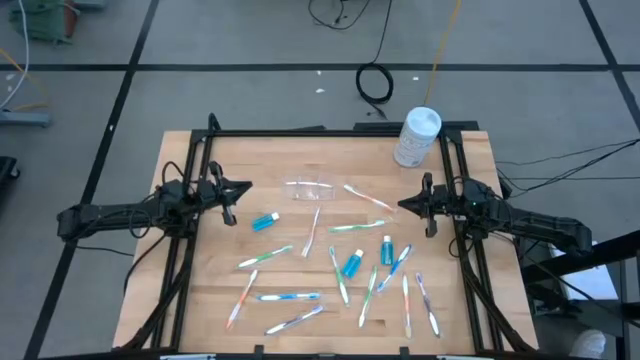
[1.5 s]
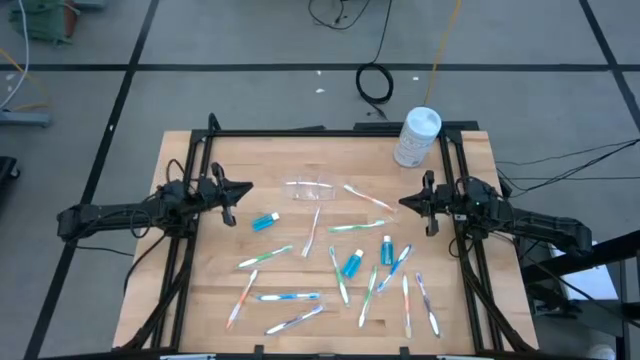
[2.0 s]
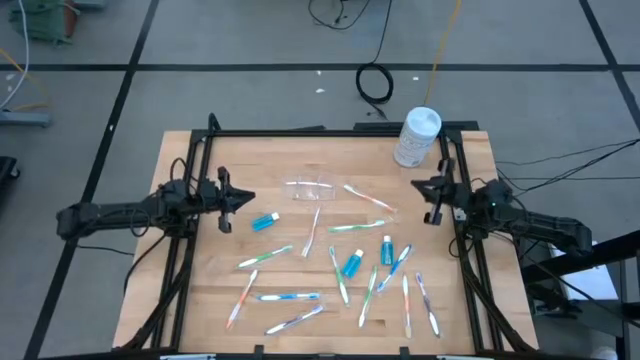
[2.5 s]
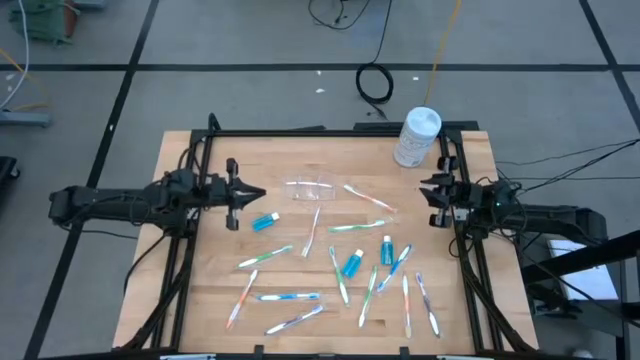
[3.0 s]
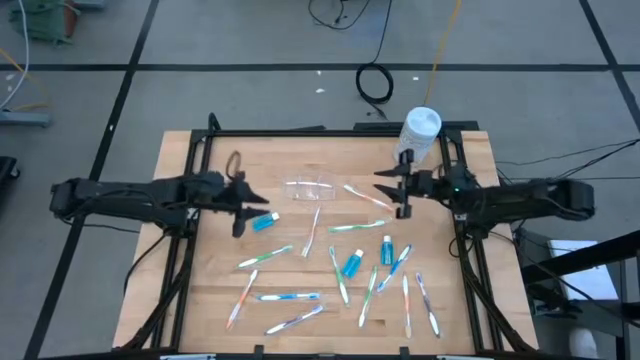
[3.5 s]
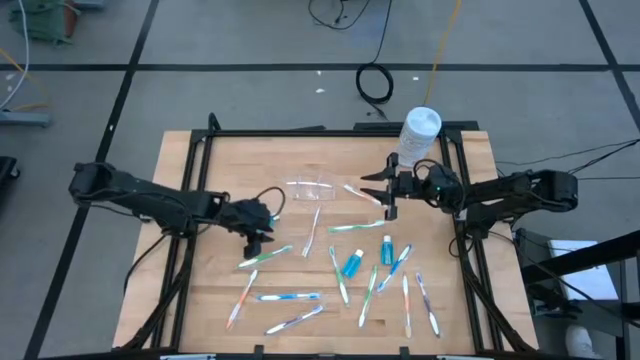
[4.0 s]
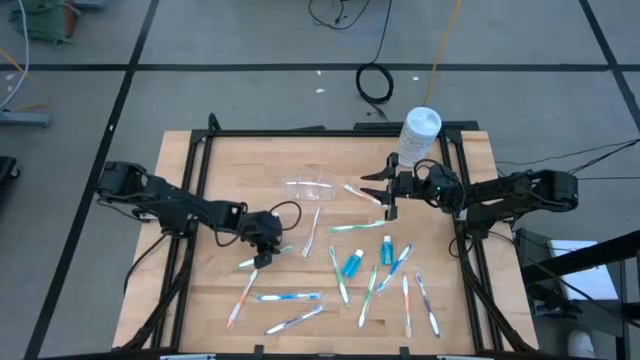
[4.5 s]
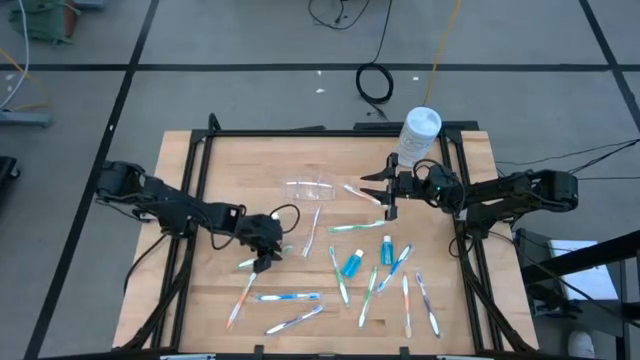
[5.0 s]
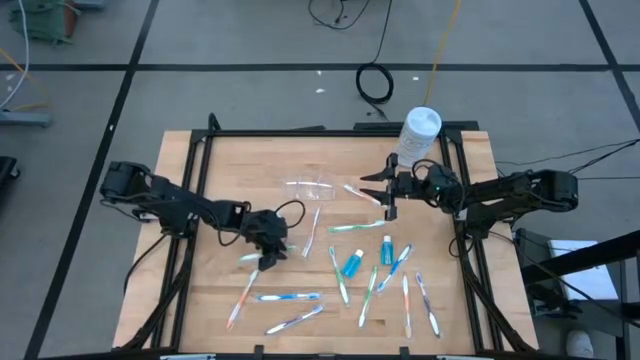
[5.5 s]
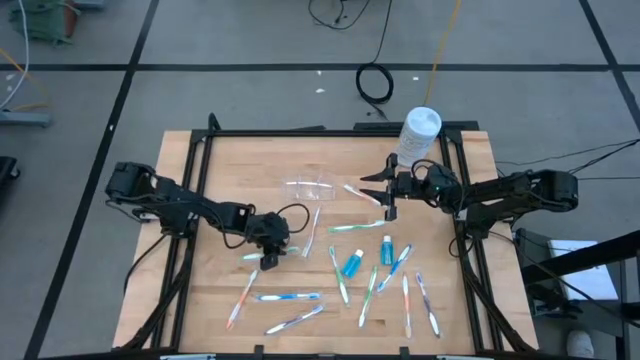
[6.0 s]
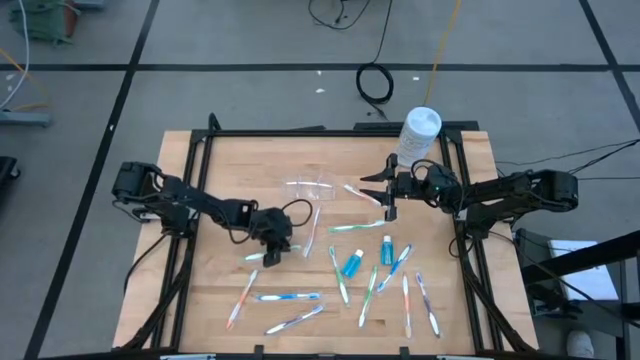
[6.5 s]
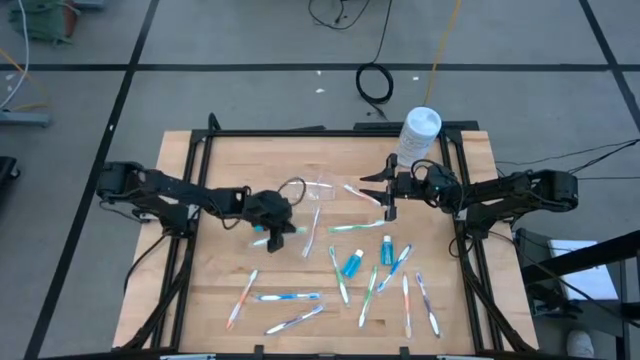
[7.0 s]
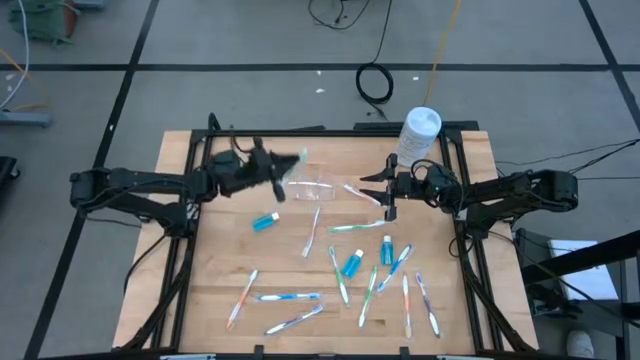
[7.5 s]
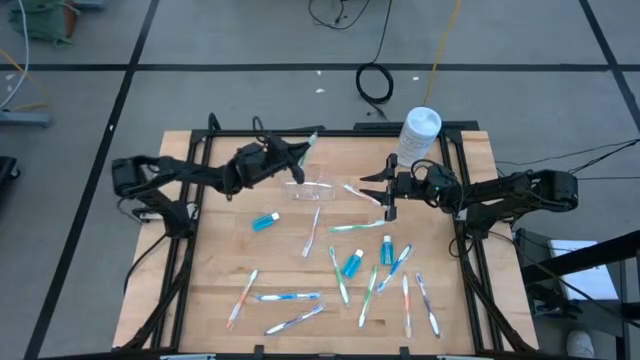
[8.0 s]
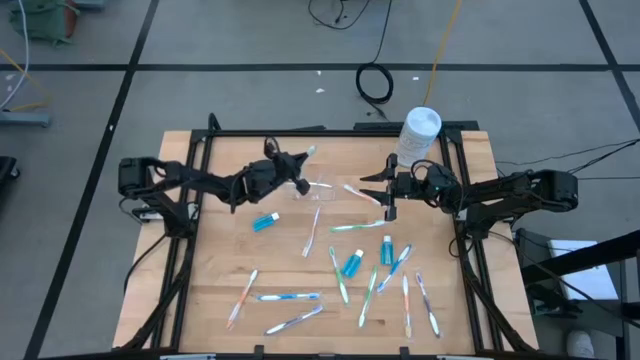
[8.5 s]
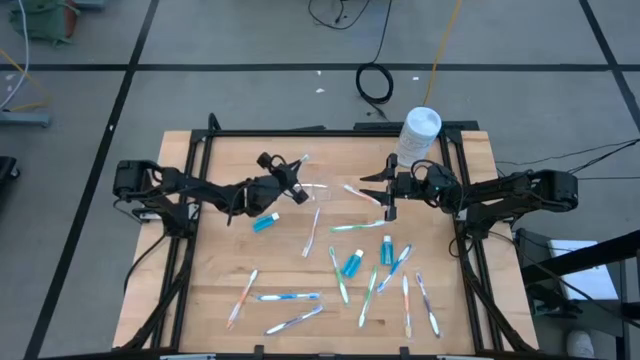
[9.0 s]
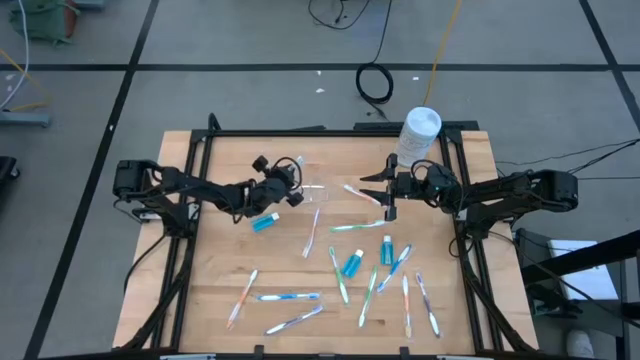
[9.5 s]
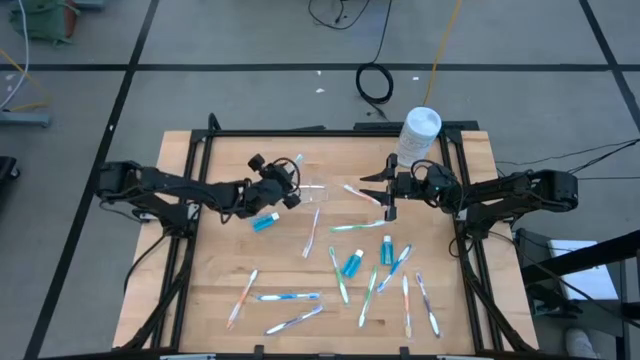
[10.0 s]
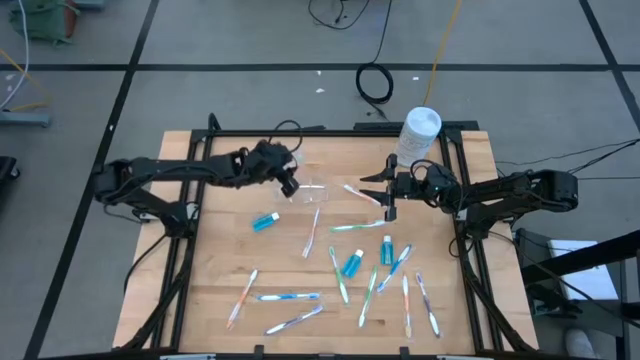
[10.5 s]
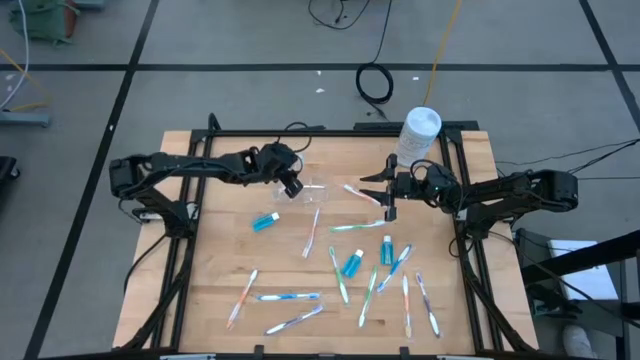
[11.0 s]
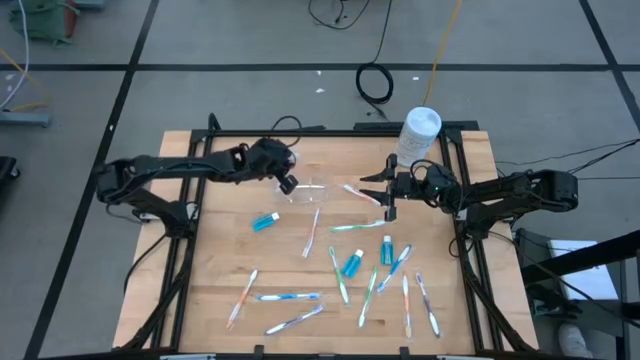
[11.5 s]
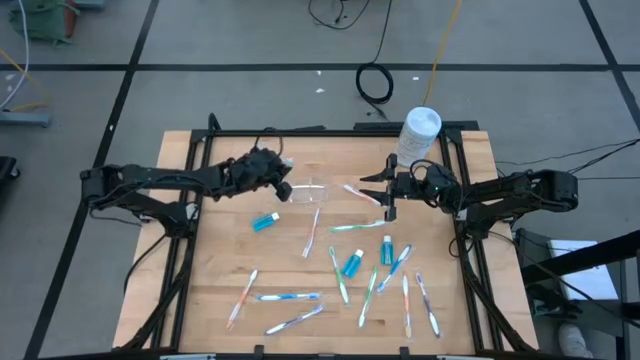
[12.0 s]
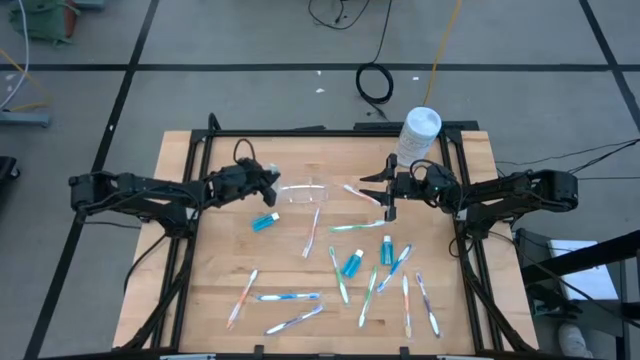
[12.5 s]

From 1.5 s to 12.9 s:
Task: Pick & Place toothbrushing station
Put the green toothbrush into the transparent organizer

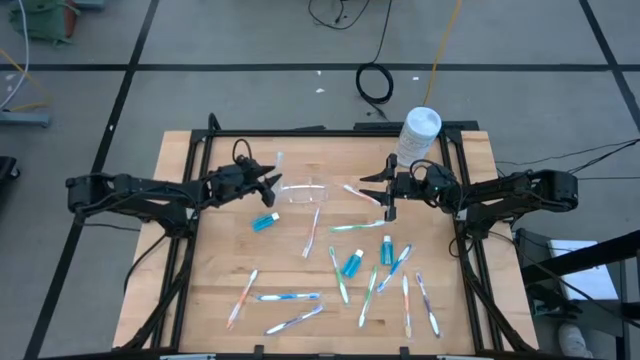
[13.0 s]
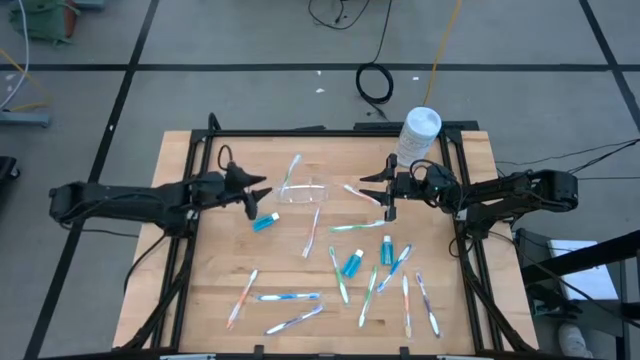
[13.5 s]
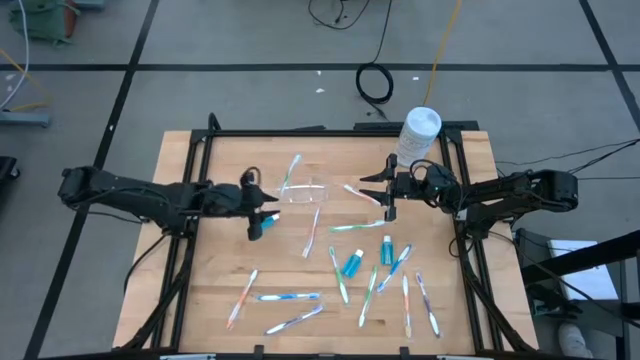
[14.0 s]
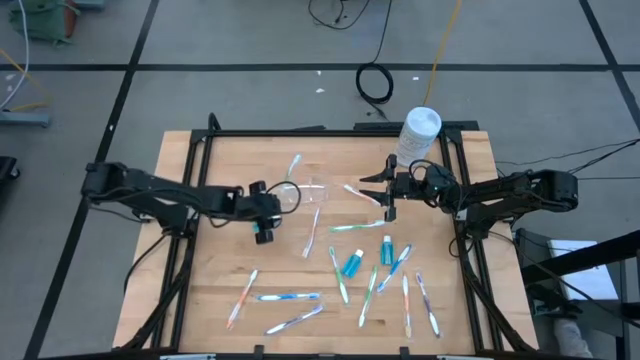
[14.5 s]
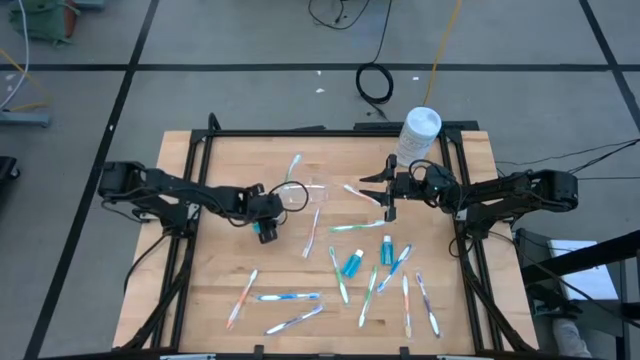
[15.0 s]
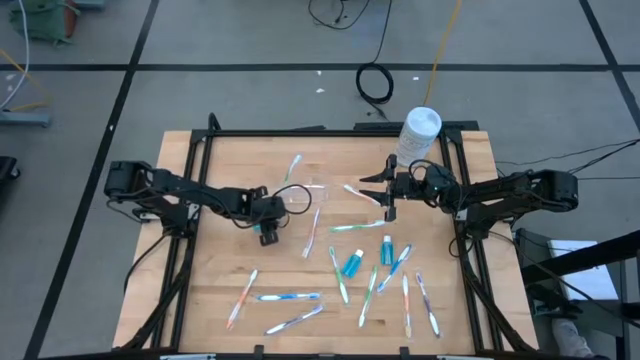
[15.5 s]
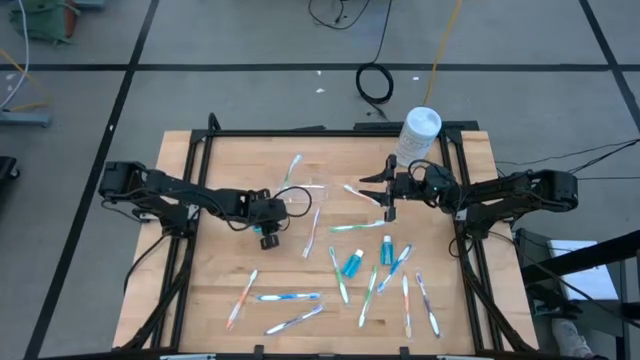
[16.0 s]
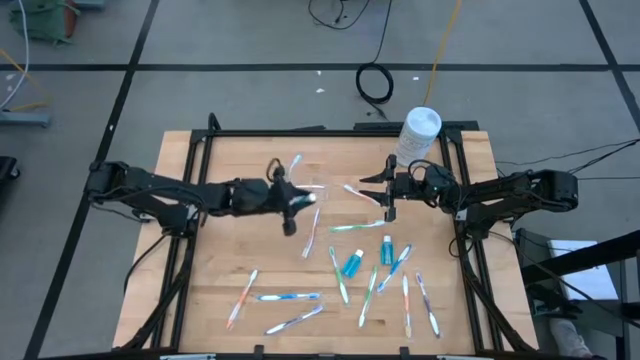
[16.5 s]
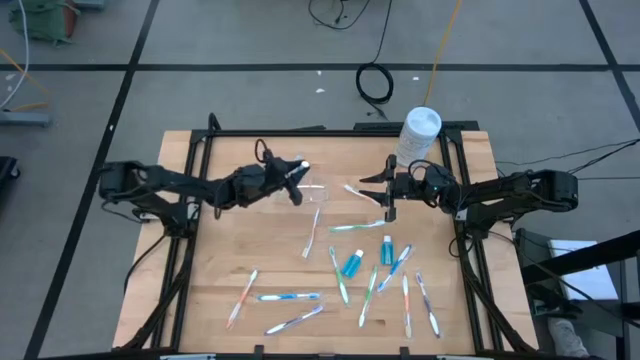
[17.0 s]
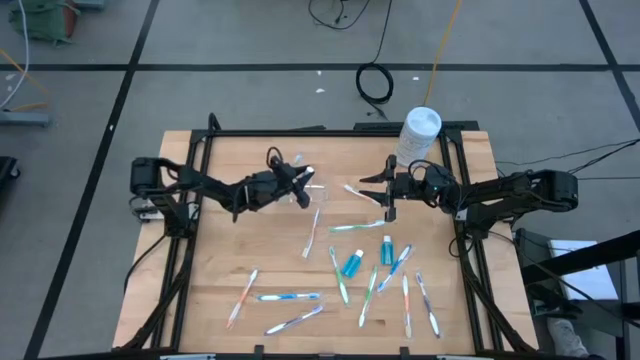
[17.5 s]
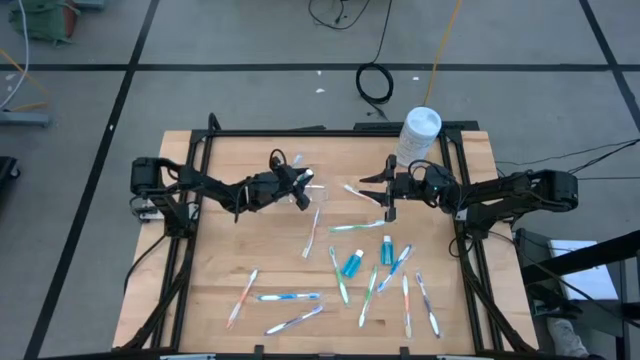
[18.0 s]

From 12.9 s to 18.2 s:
Put the blue mouthwash into the transparent organizer

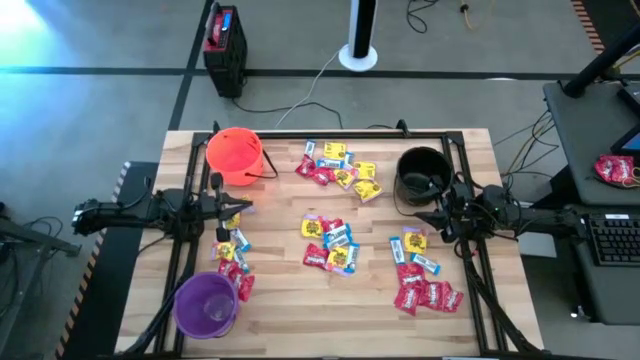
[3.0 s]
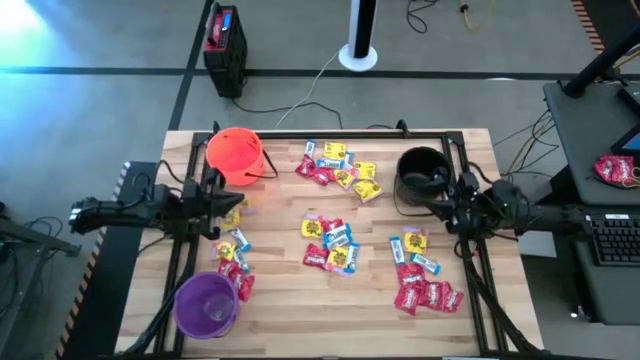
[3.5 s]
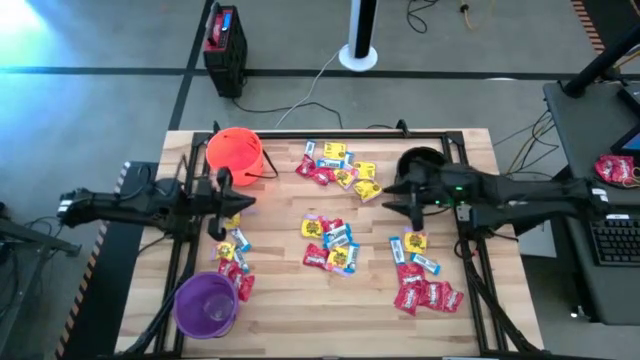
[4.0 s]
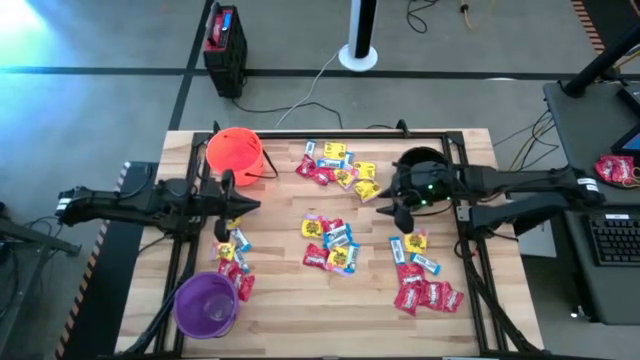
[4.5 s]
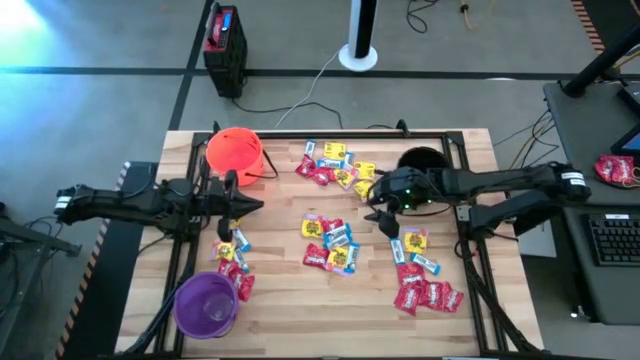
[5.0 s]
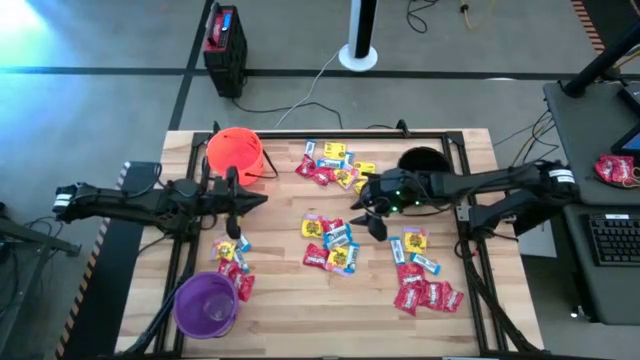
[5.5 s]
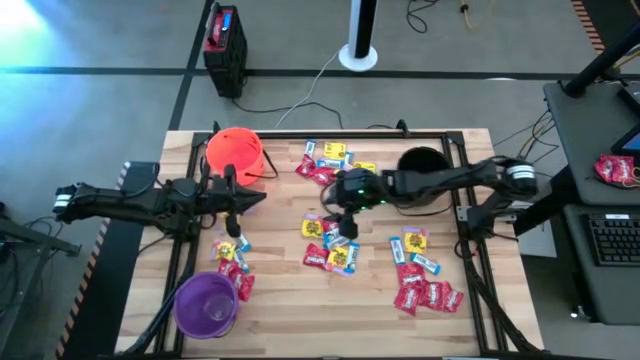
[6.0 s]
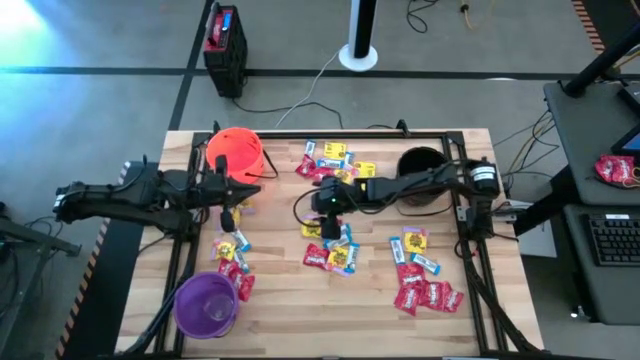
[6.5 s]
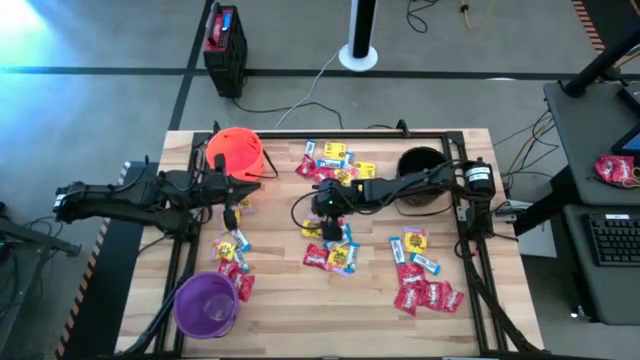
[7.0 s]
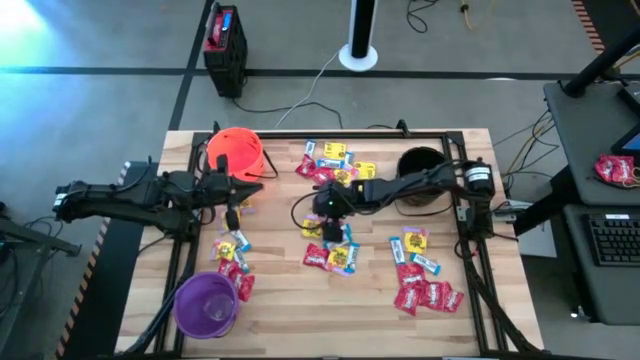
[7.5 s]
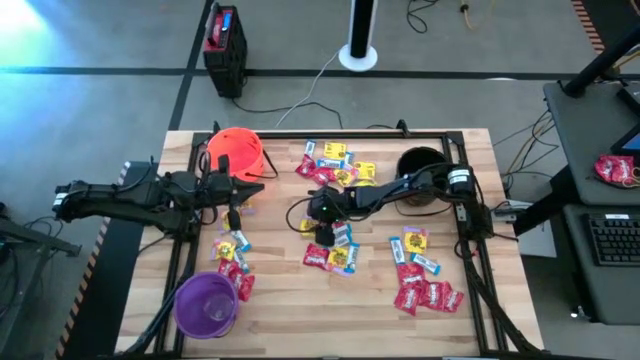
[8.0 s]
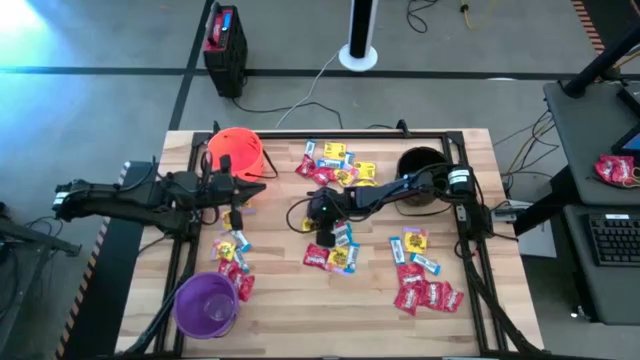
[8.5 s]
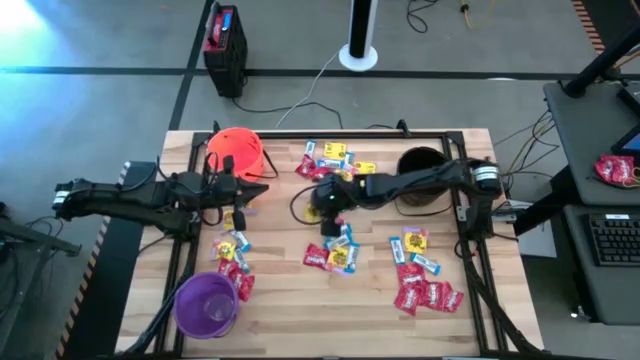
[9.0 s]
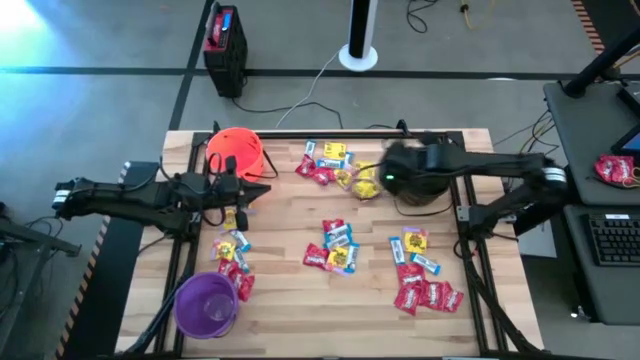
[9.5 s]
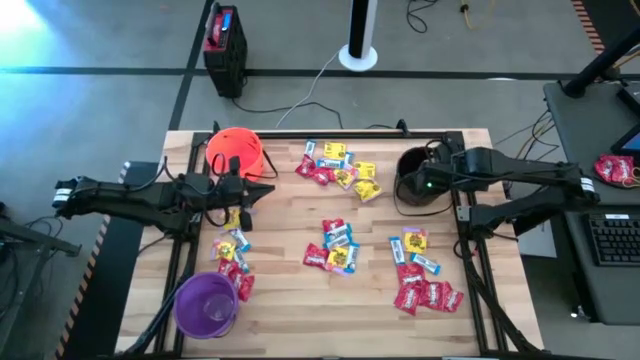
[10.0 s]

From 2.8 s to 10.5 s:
Task: Sort candy by brand, put in halloween buckets
Put the yellow candy into the black bucket
